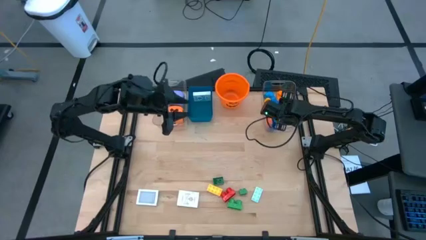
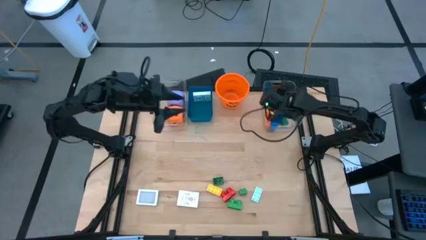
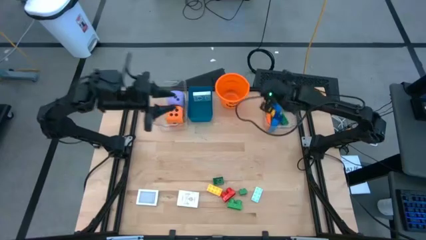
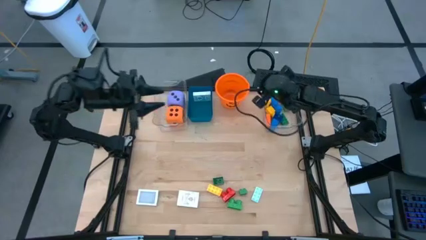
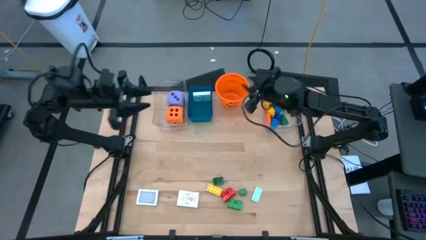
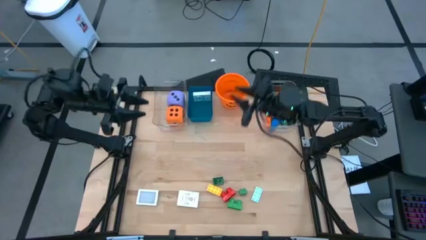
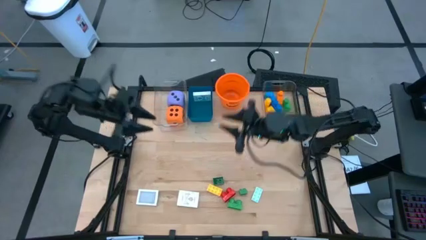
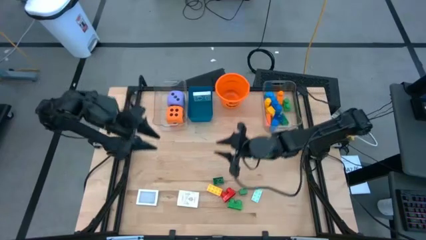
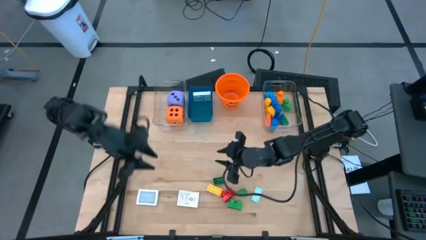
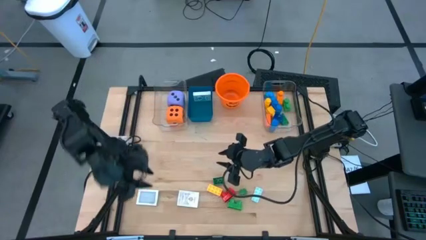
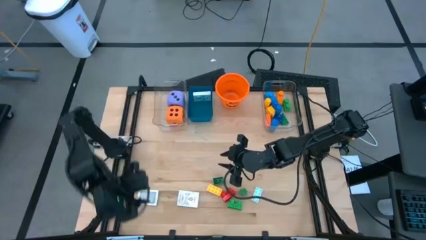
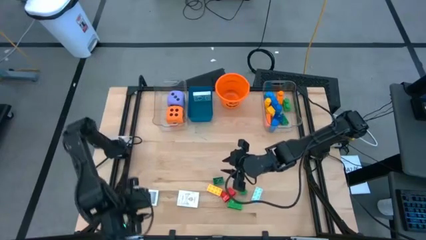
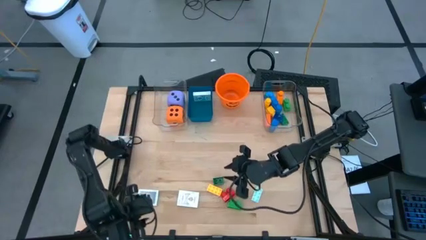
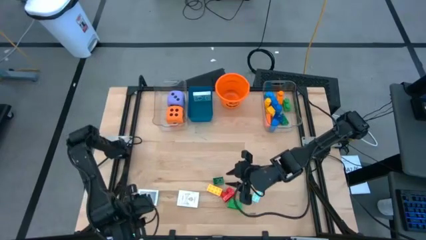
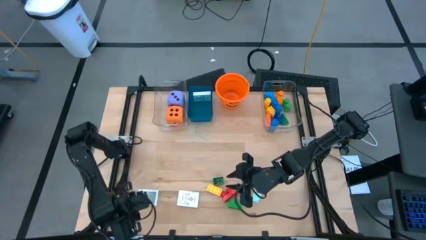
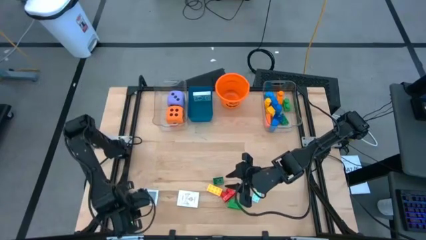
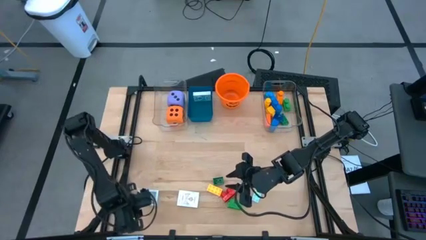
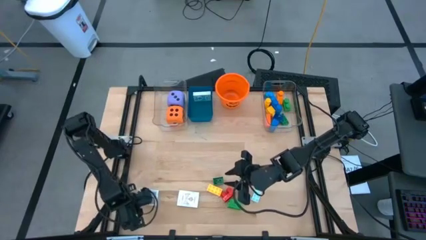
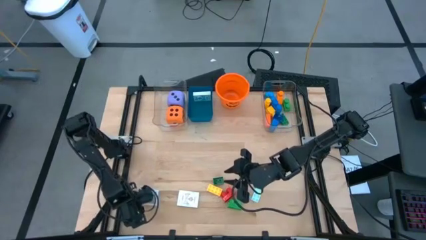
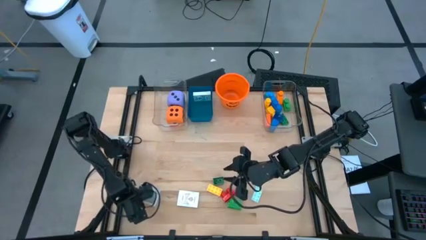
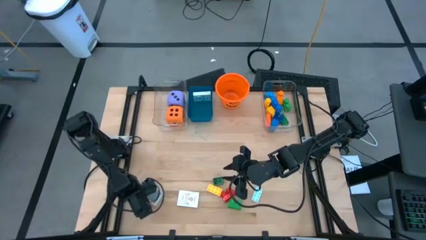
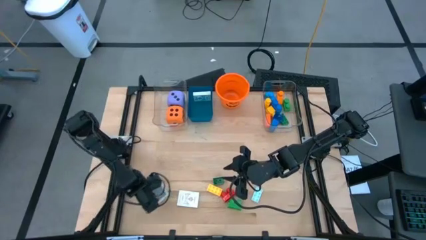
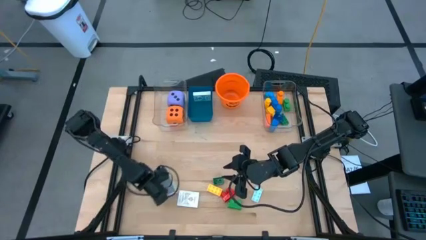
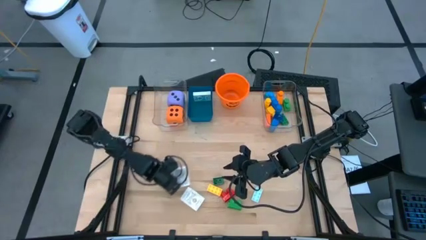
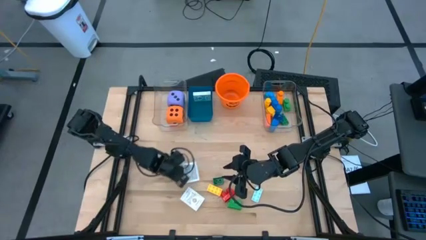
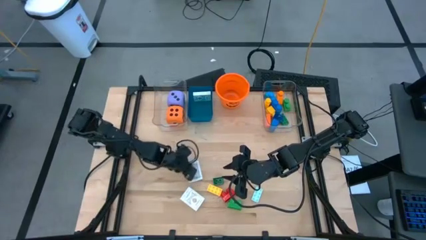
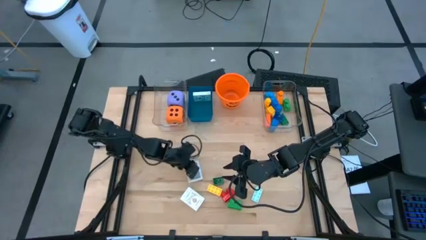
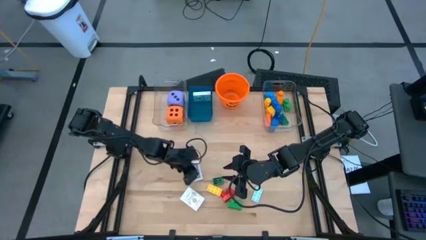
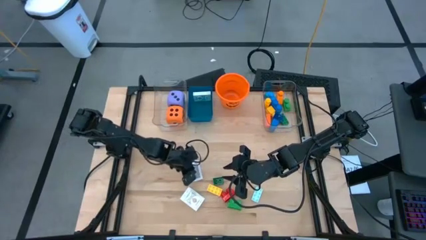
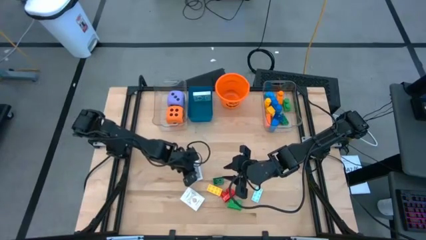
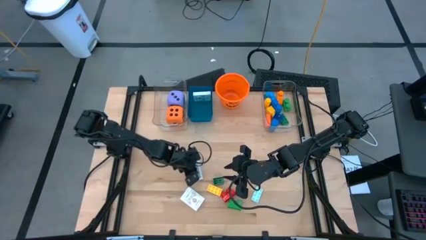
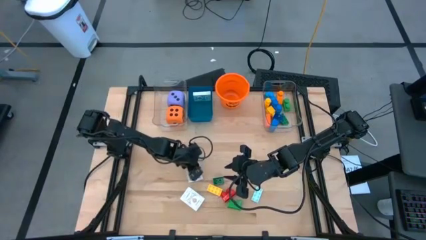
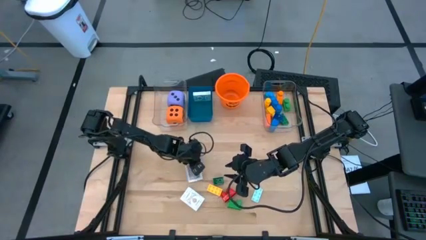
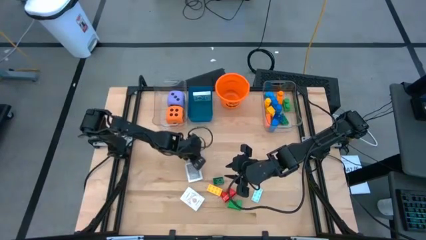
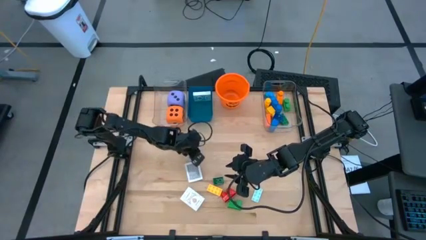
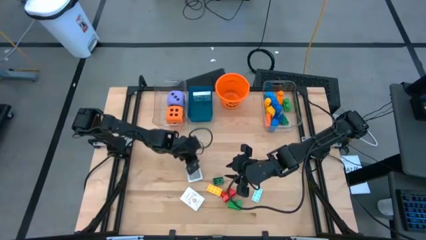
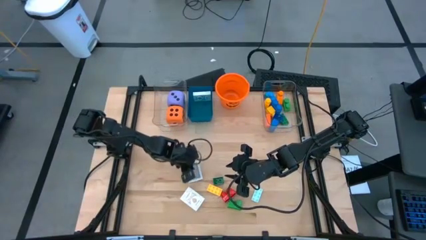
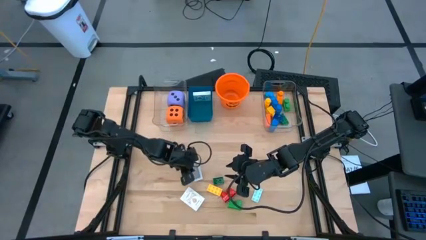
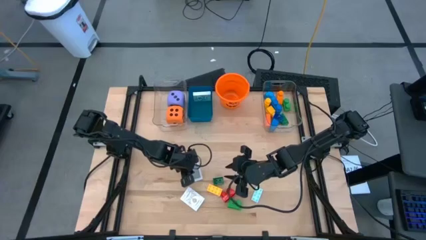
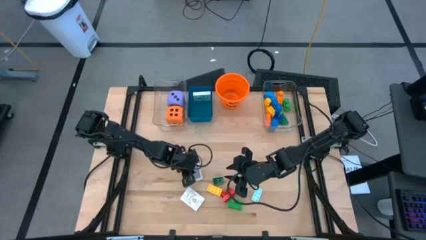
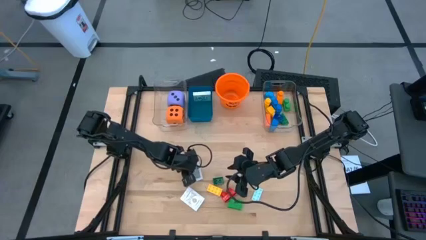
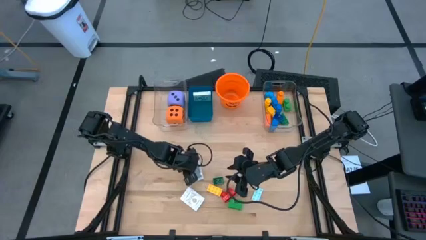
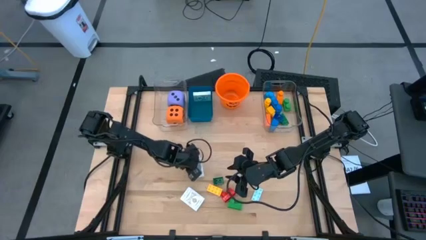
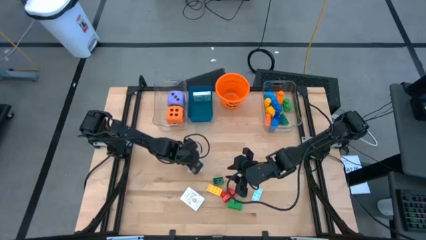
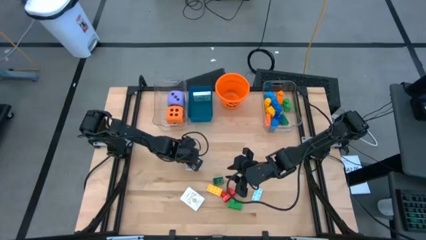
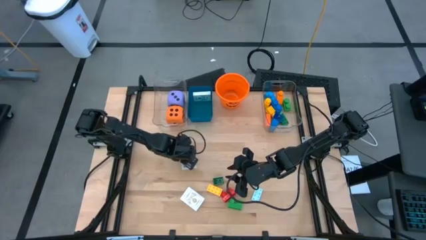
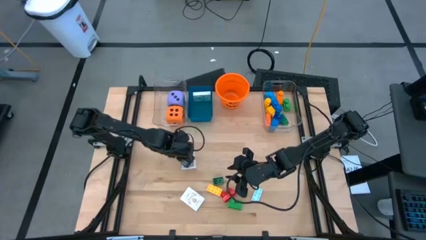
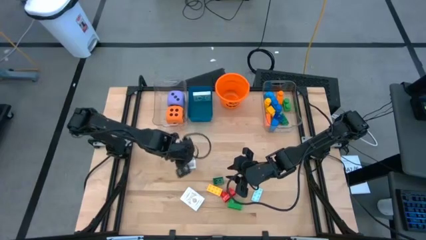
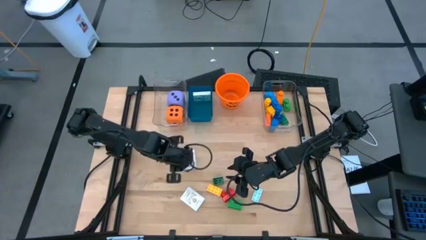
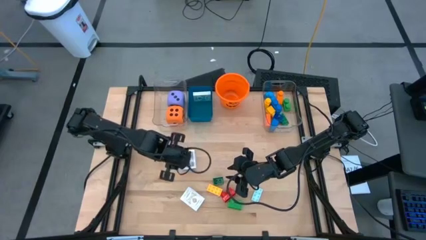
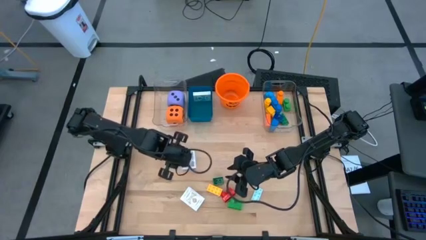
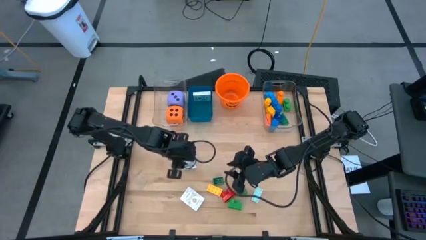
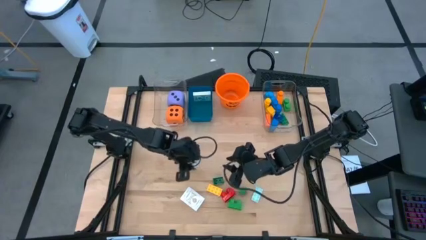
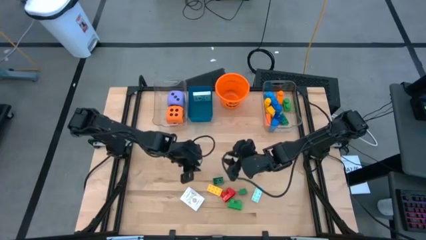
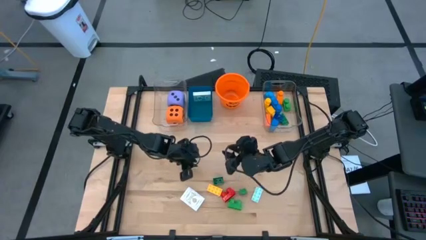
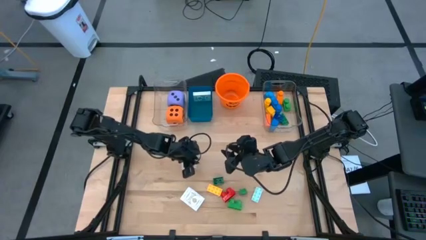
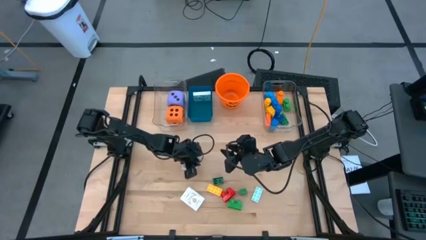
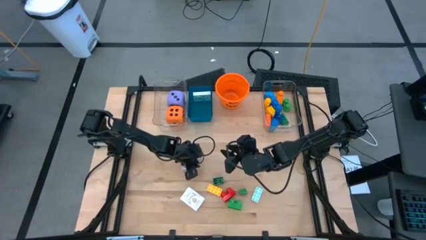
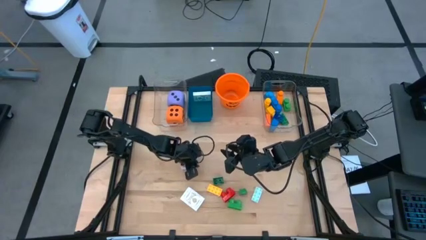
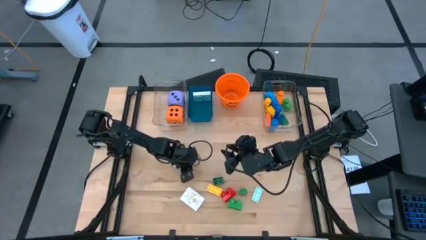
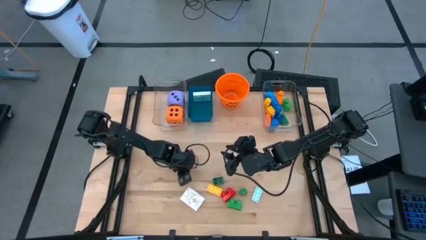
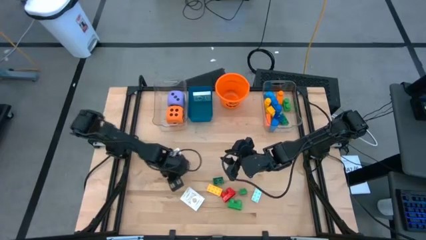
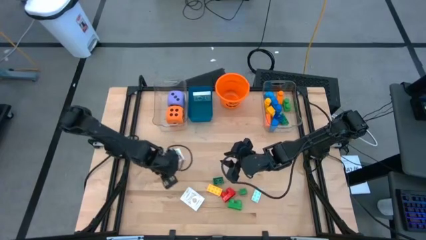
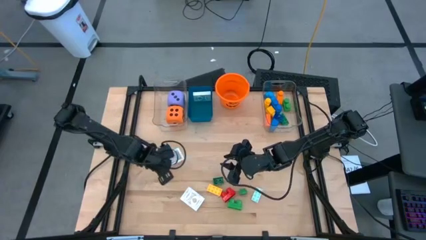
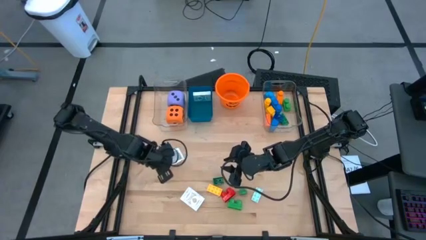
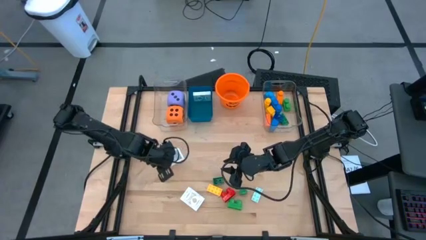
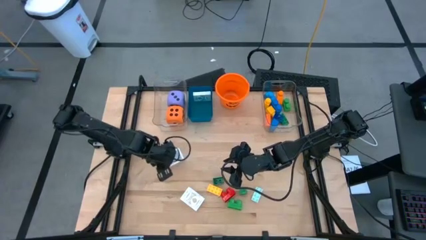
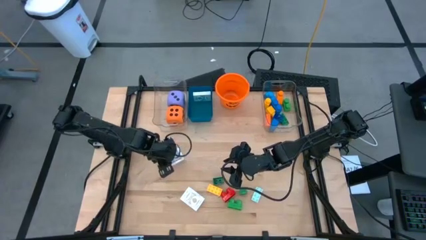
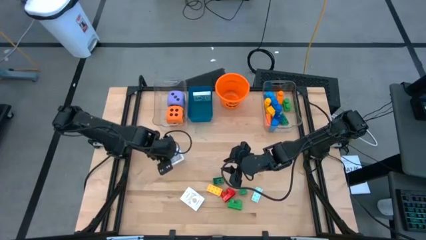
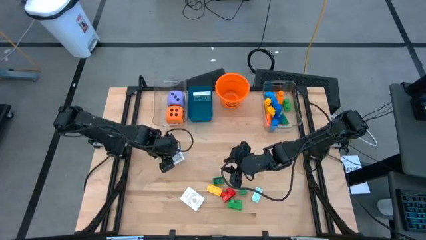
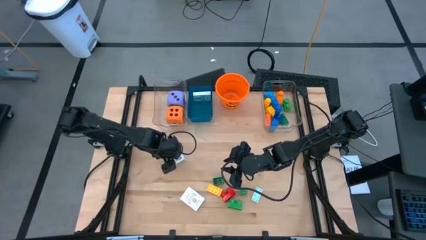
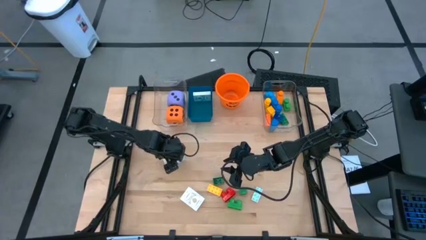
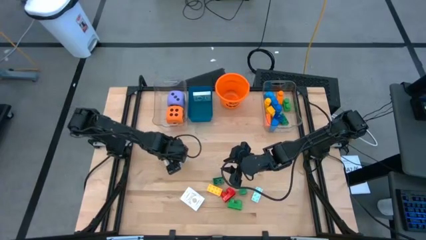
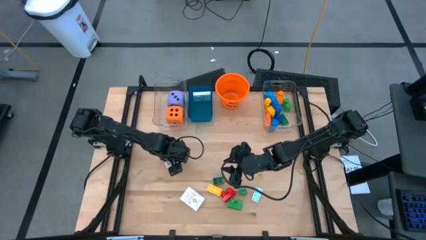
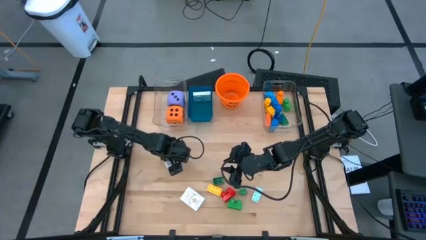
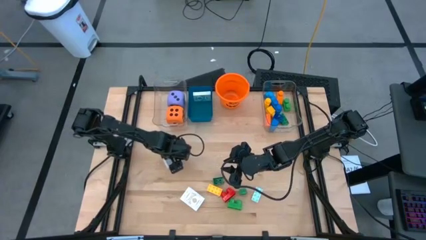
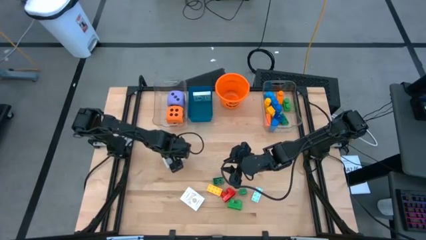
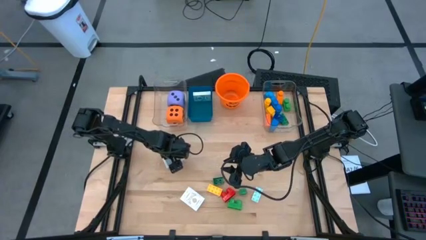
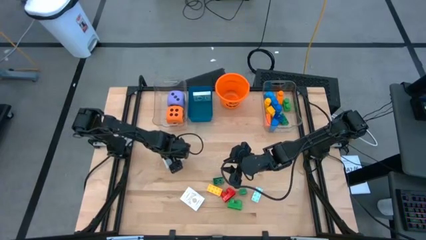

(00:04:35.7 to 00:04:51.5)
Task: Pick & Place Toys
Put the black deck of cards into the blue bin
